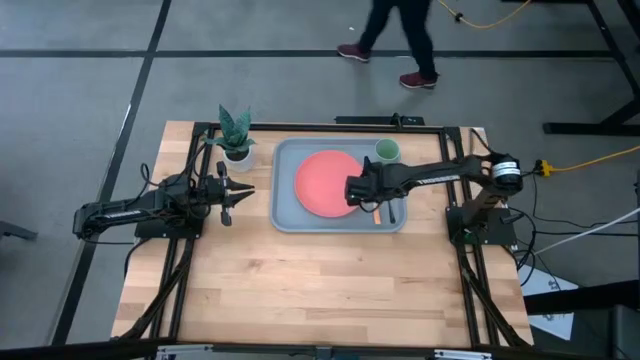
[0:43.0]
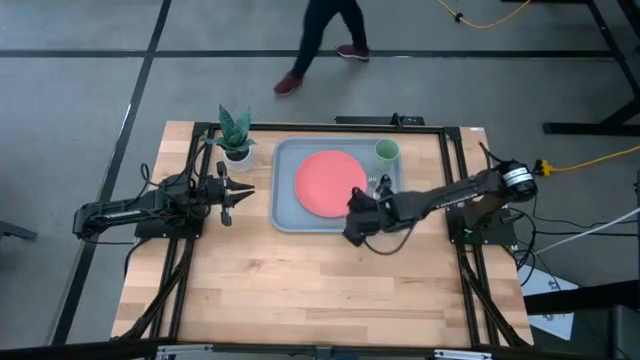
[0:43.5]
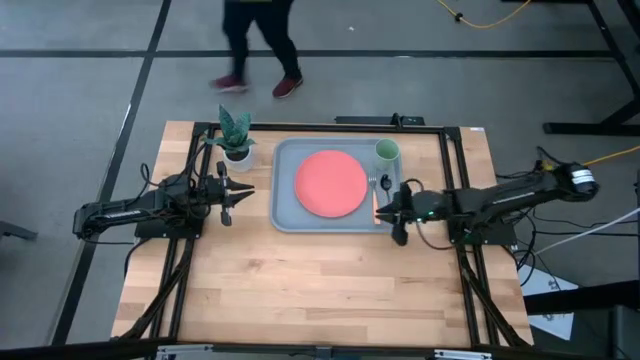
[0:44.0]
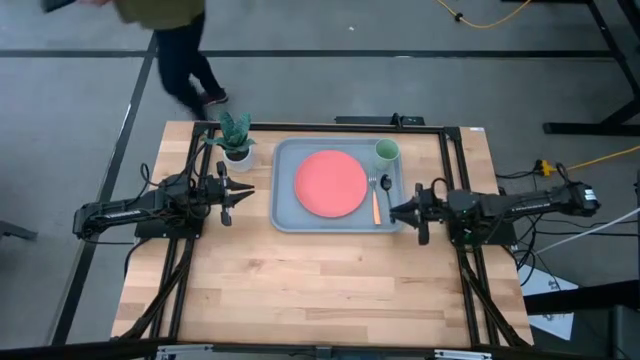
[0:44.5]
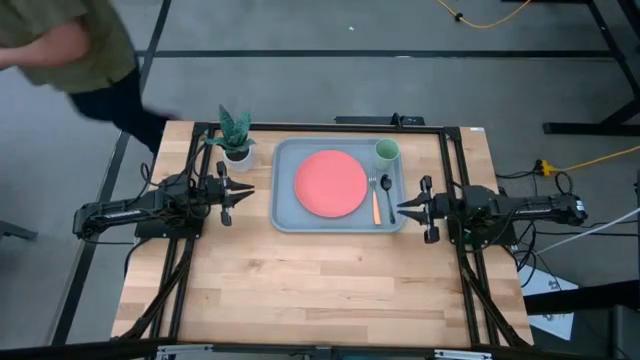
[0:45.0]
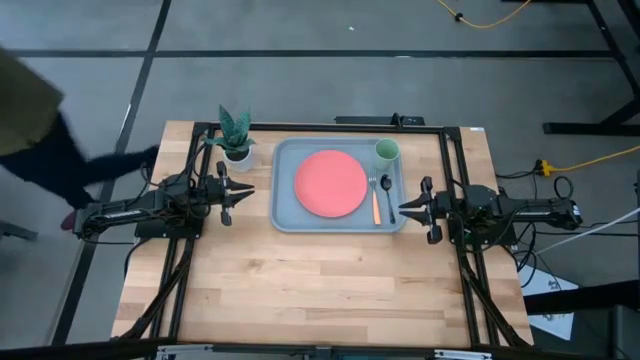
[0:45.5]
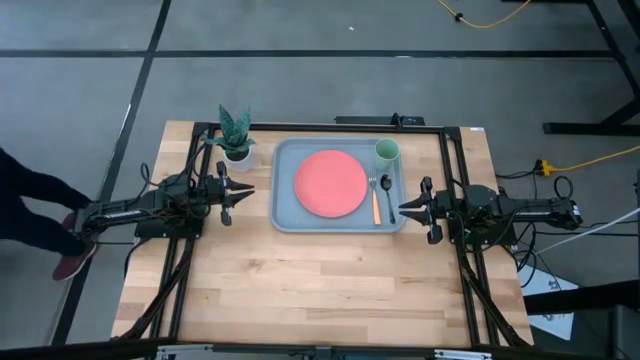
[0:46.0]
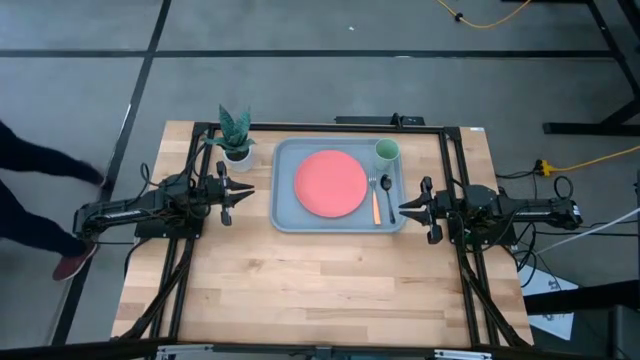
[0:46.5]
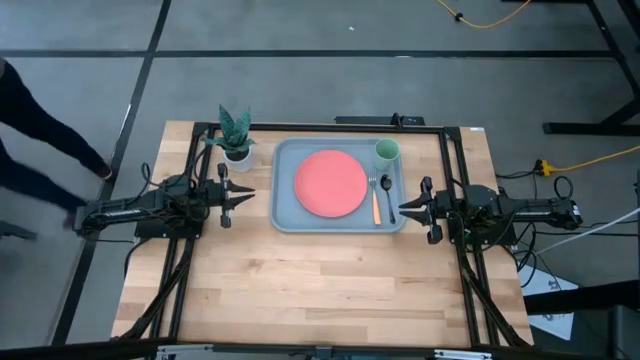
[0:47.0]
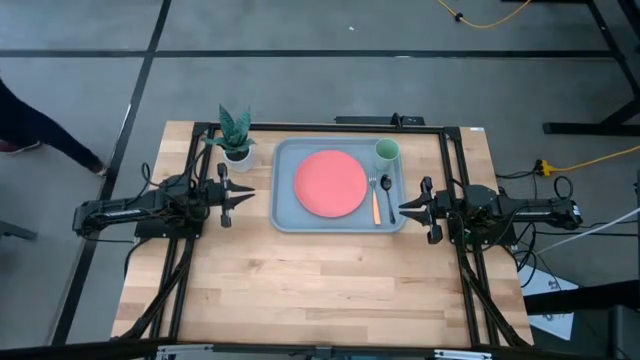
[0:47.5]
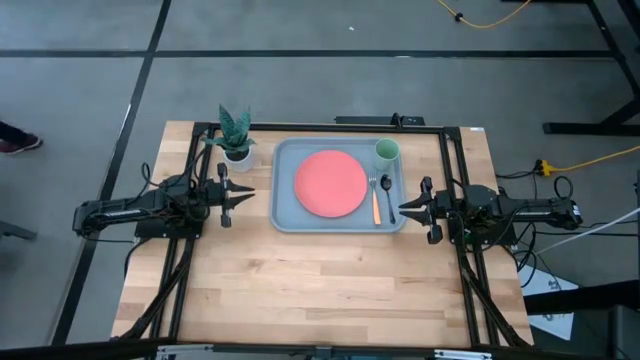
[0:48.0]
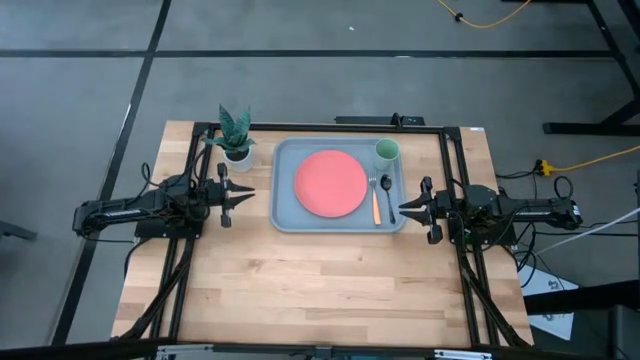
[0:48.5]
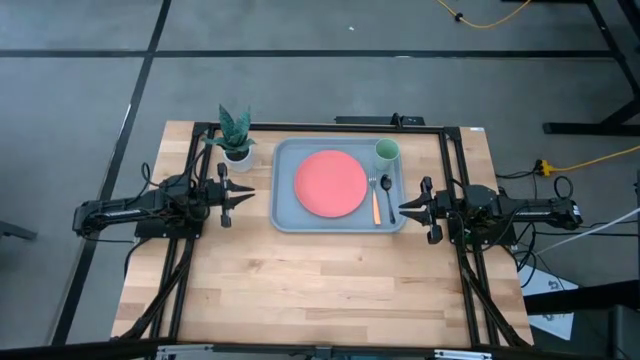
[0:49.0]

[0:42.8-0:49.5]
Task: Pick and place plate/cup/fork/spoon on tray
Return to Home Position

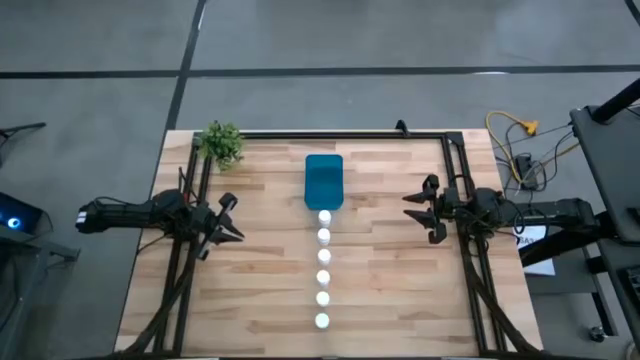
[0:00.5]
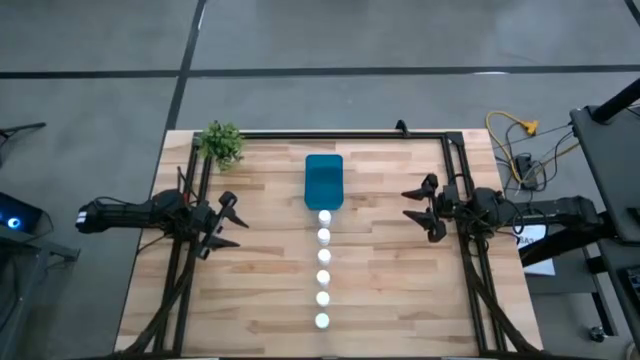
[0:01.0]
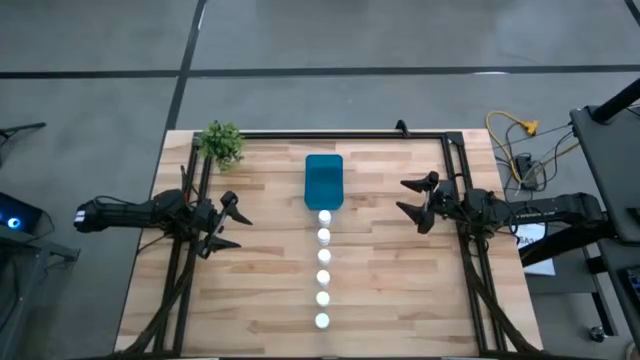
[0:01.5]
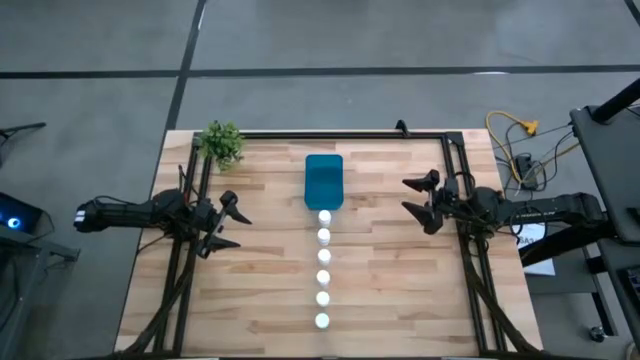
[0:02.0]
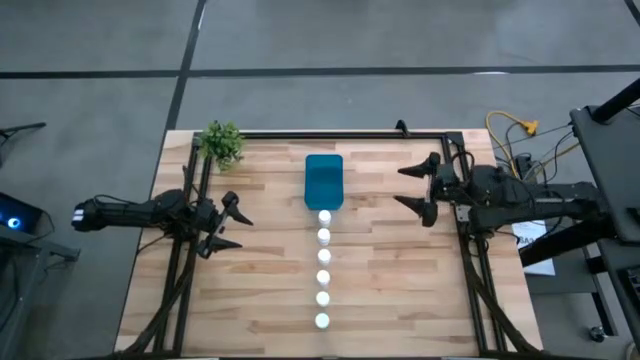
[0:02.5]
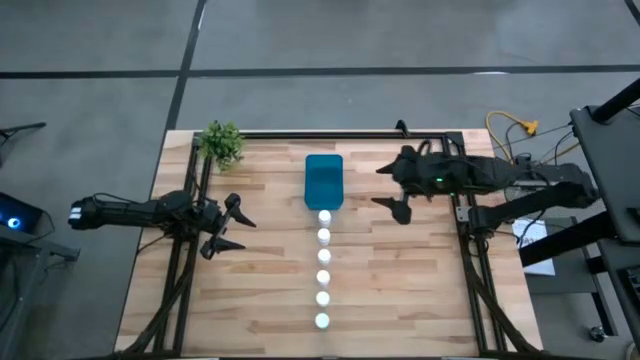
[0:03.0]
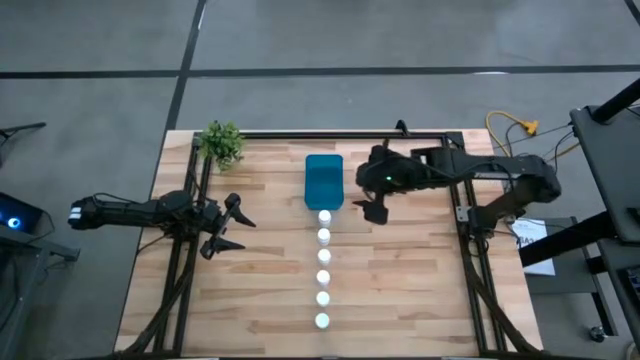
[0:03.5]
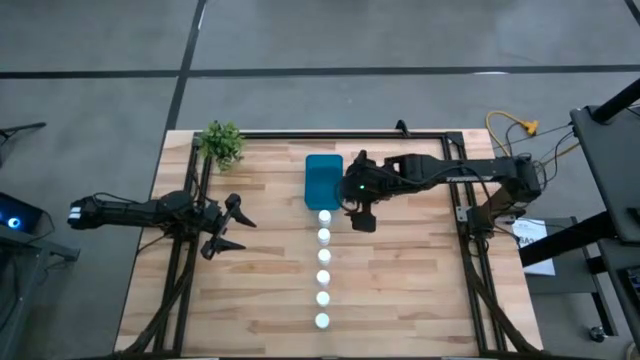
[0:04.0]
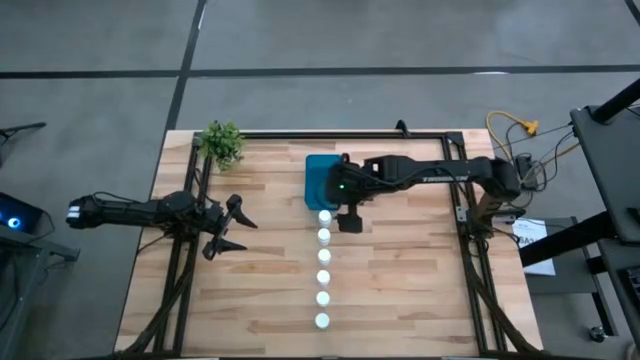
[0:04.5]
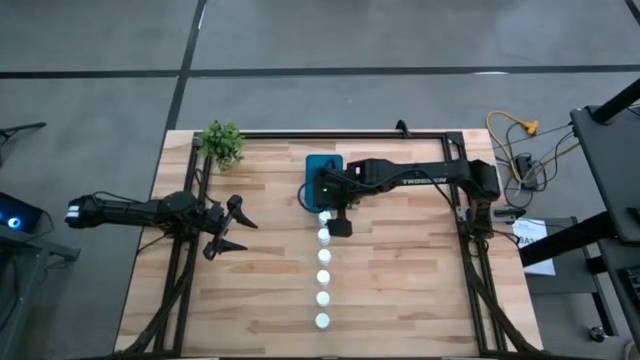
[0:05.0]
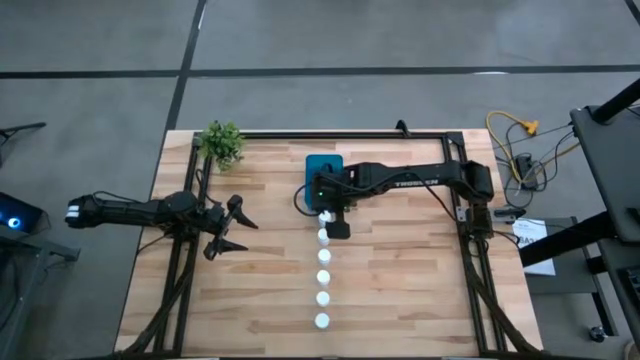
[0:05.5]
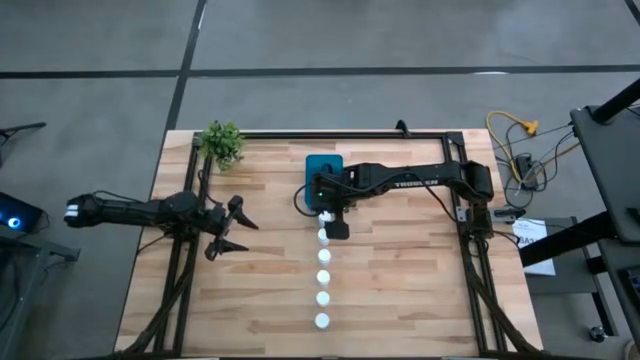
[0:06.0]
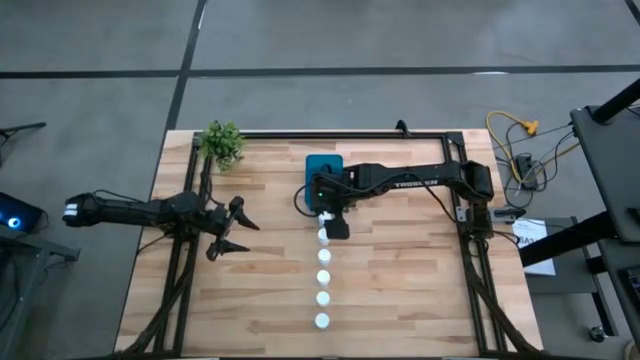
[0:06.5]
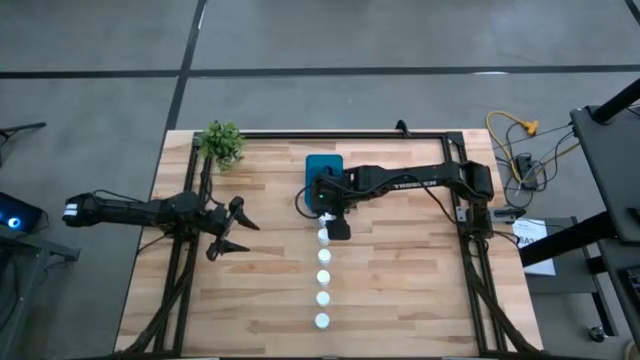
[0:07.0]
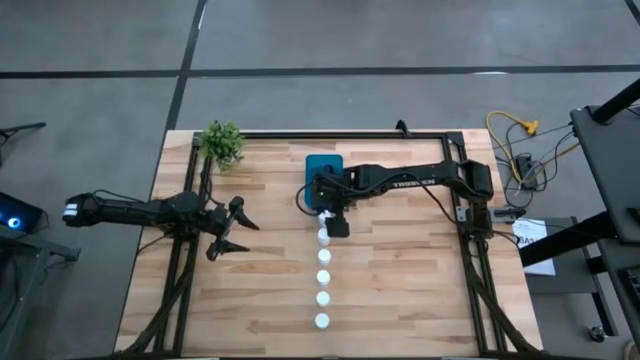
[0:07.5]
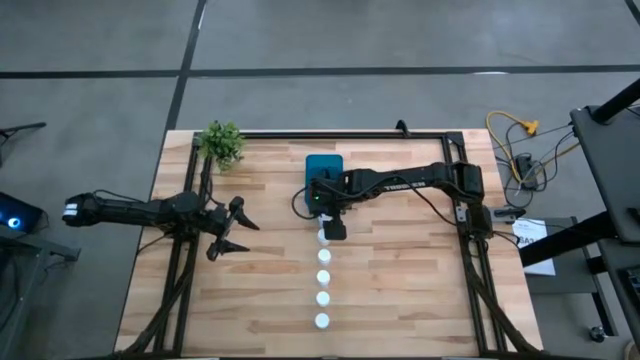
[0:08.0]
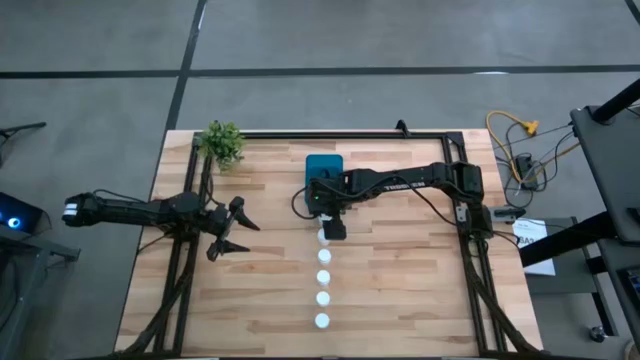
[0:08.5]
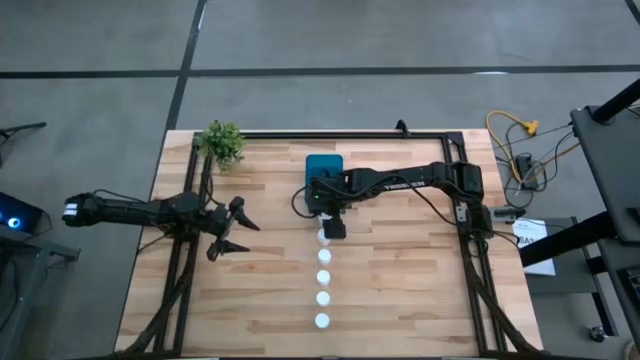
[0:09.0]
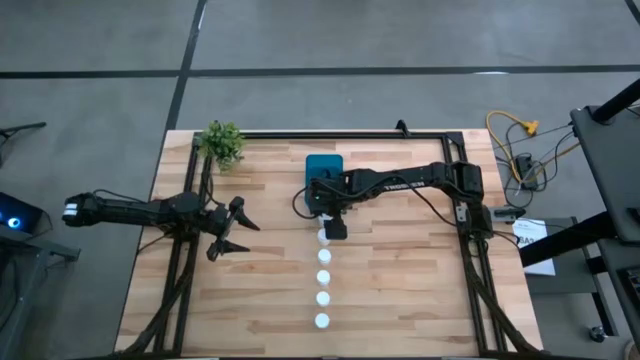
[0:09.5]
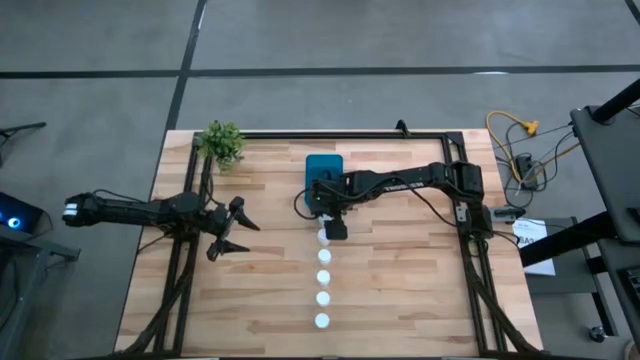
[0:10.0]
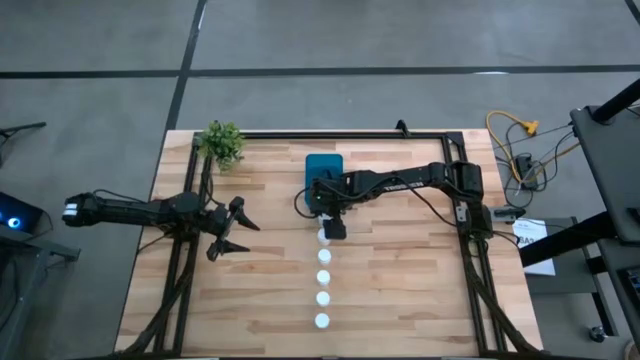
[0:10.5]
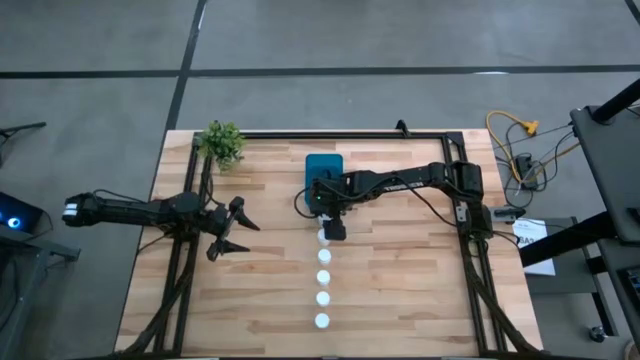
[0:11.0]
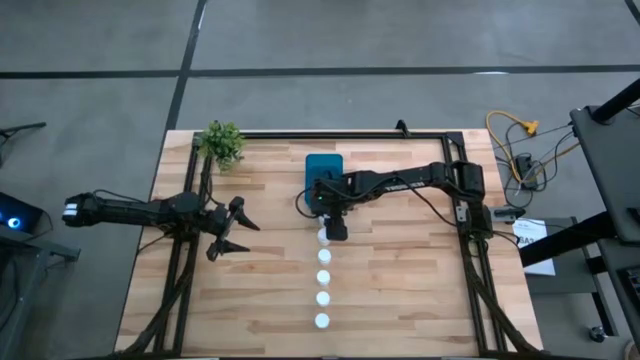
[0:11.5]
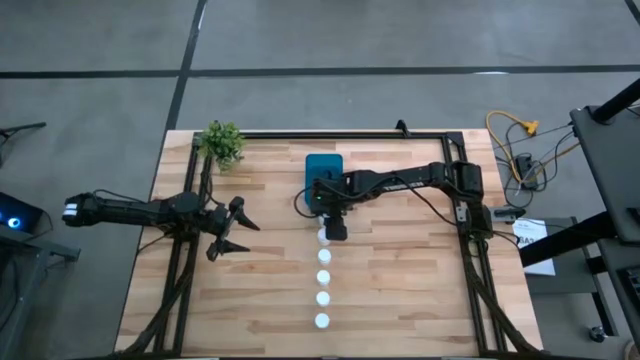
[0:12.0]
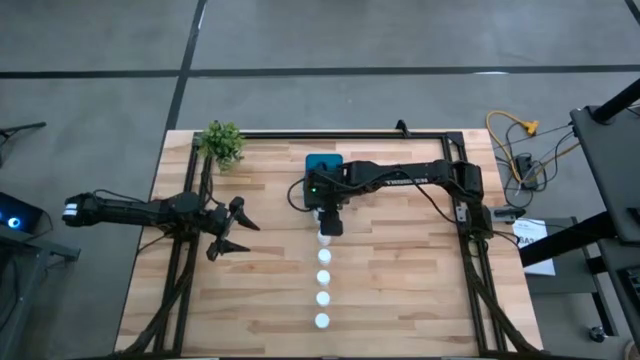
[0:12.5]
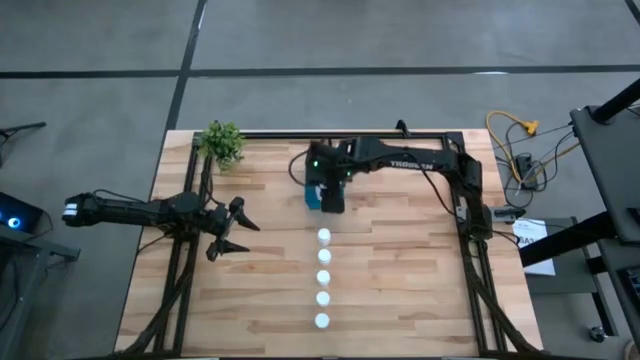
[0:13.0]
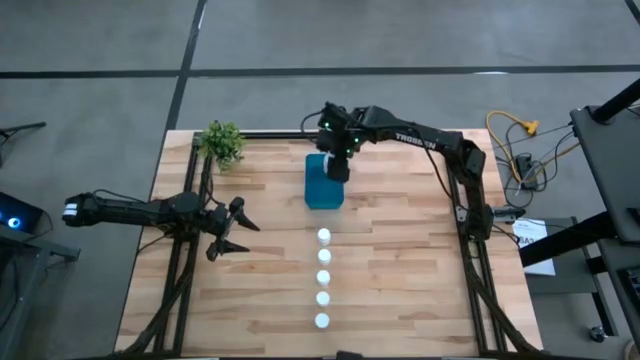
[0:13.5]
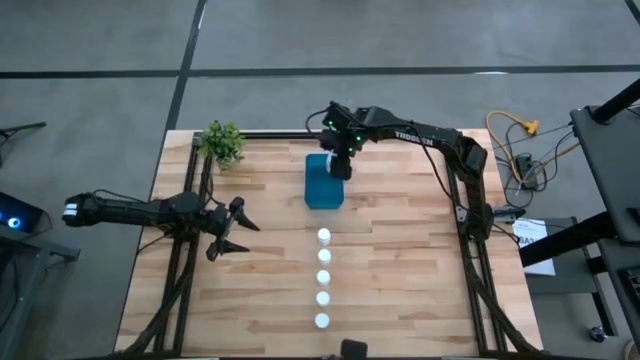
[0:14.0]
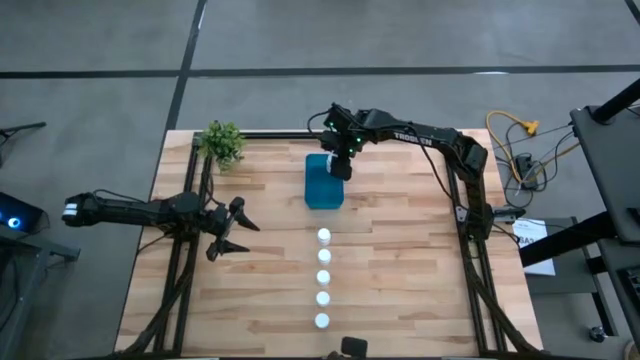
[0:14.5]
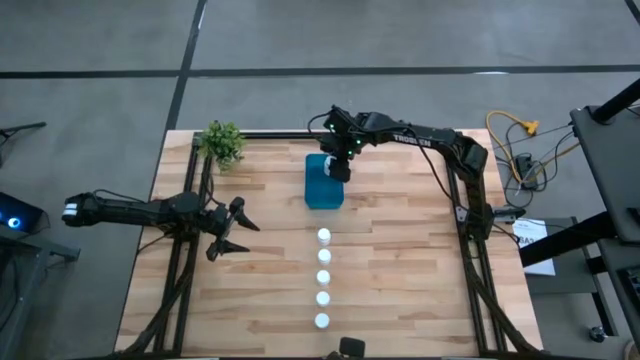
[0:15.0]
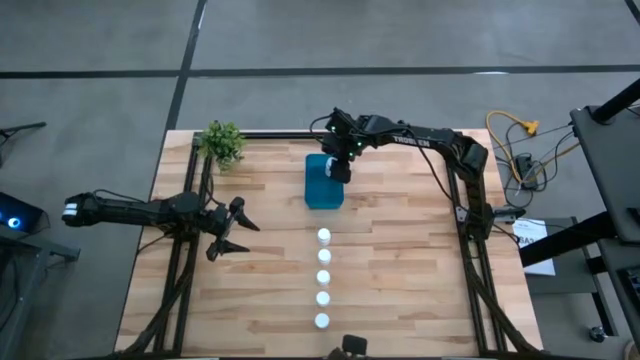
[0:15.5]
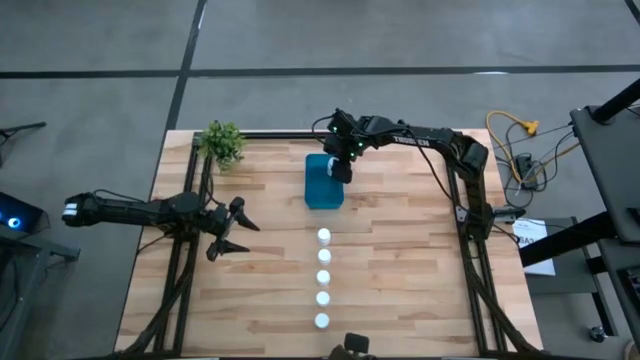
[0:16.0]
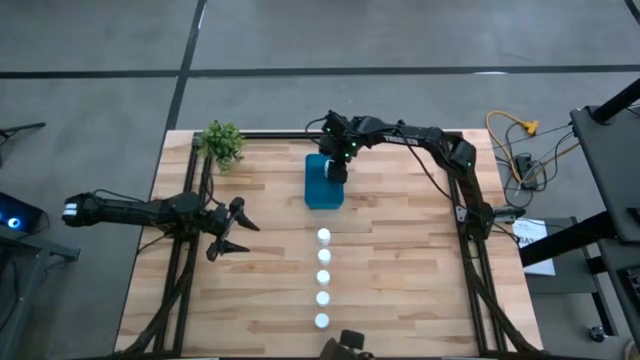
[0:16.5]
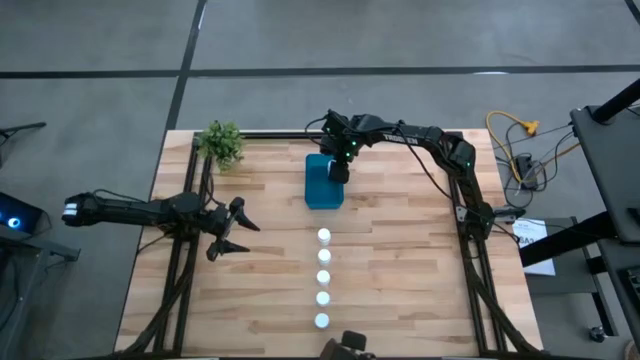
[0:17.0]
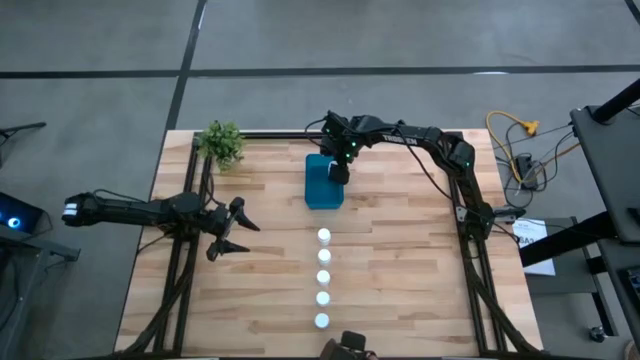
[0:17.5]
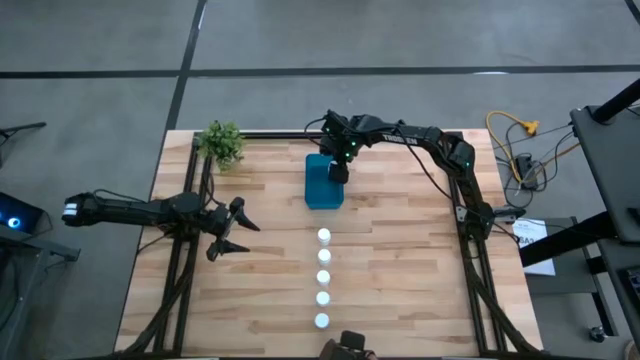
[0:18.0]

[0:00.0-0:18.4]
Task: Pick and place pill bottles into a basket
Put the white pill bottle into the blue bin
